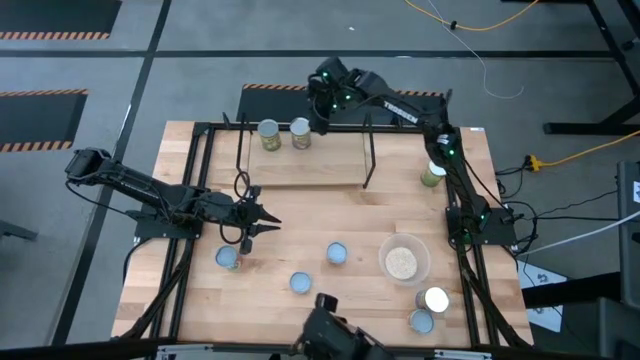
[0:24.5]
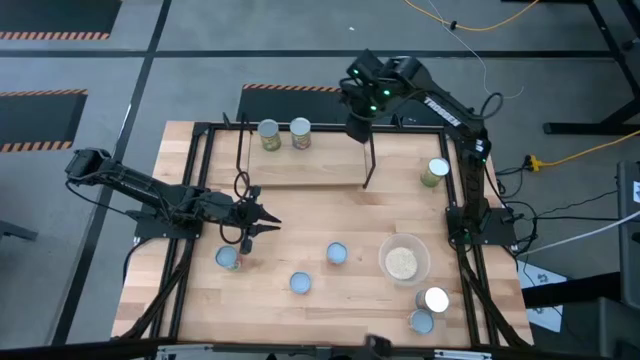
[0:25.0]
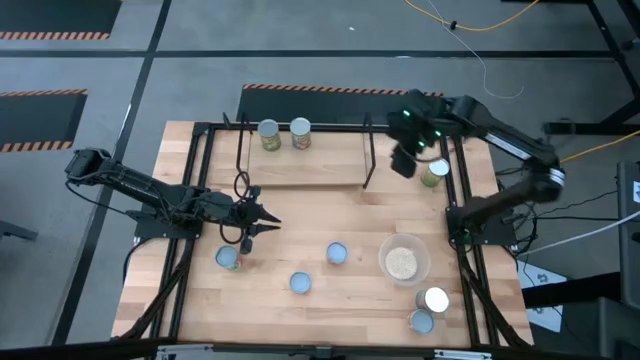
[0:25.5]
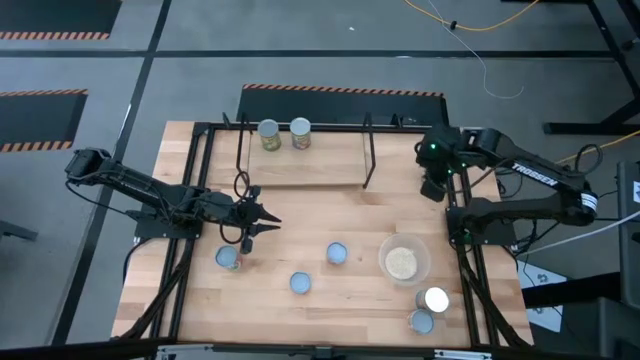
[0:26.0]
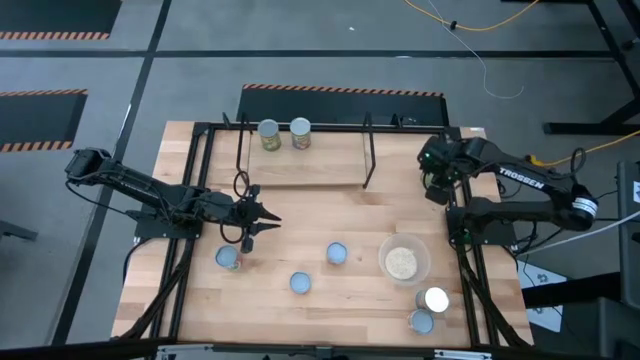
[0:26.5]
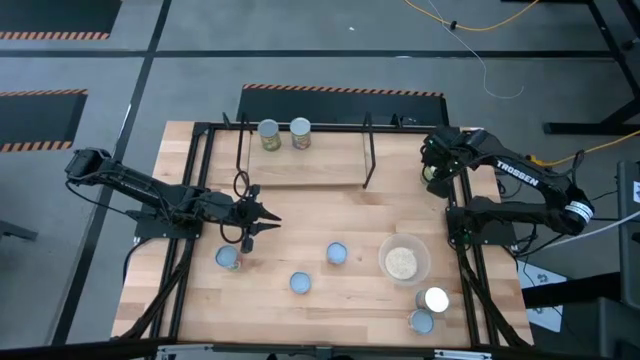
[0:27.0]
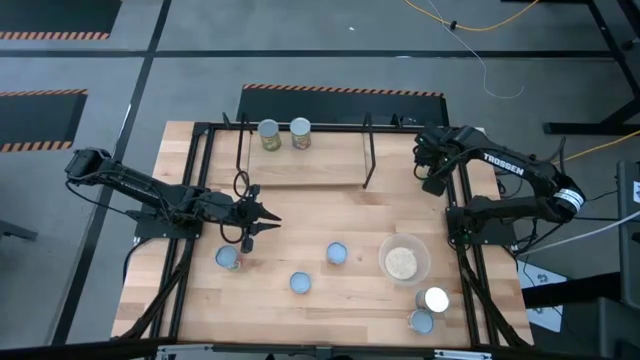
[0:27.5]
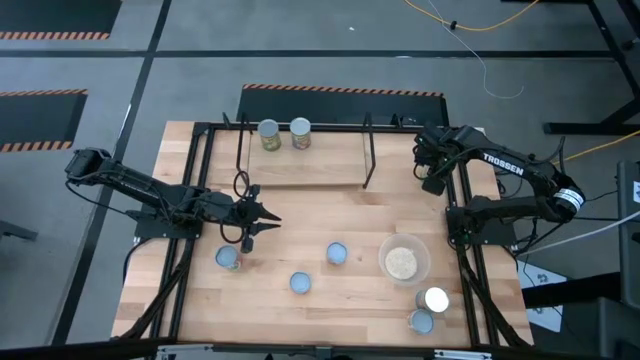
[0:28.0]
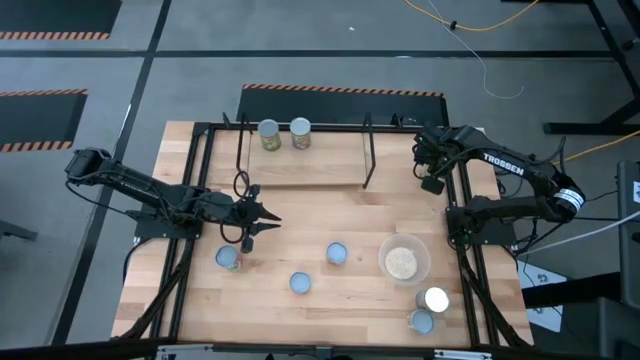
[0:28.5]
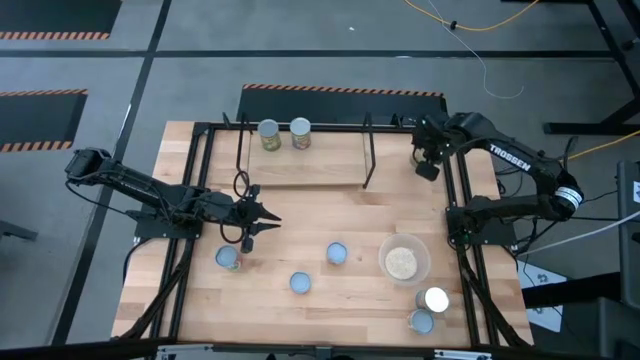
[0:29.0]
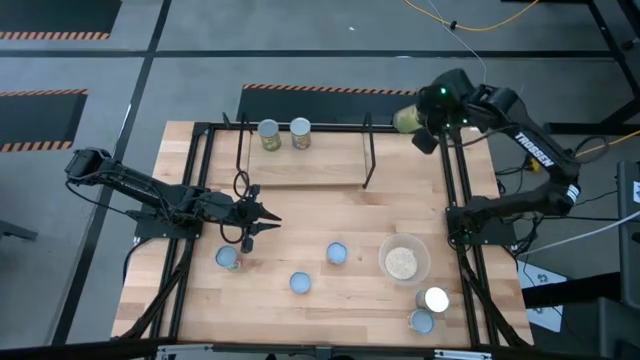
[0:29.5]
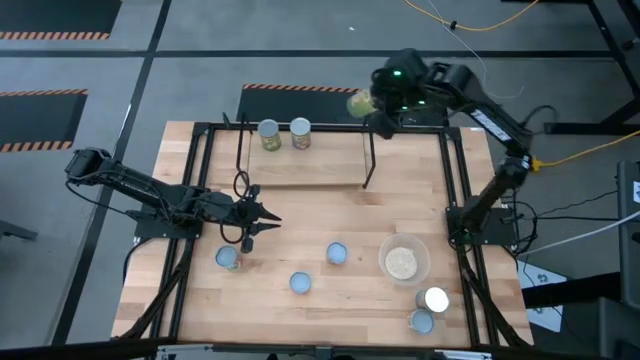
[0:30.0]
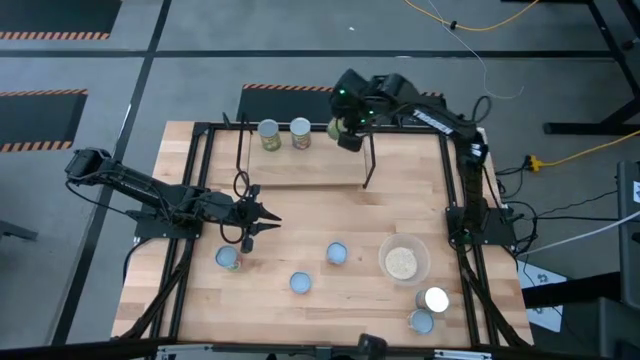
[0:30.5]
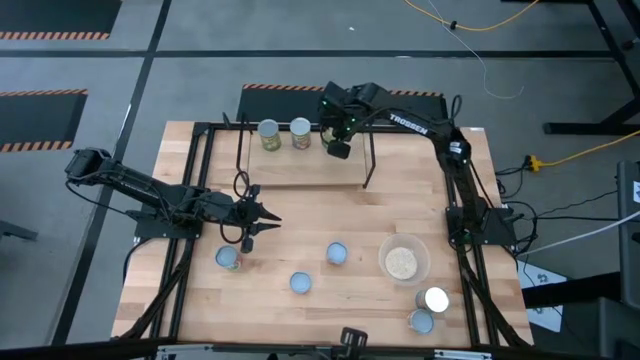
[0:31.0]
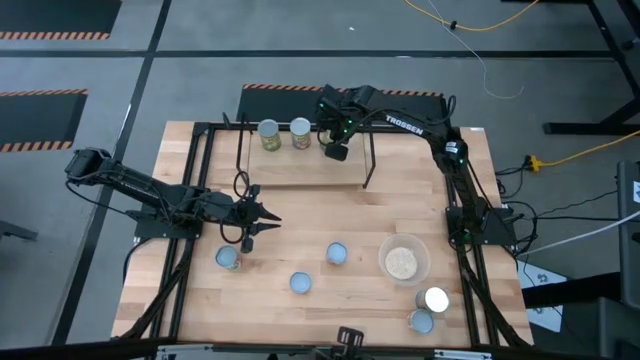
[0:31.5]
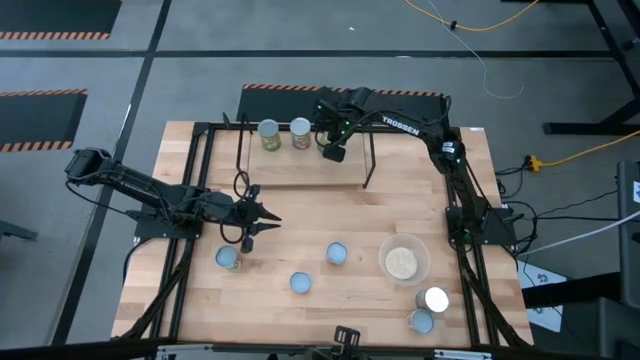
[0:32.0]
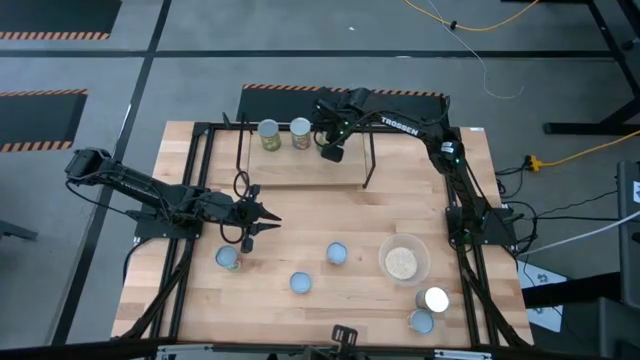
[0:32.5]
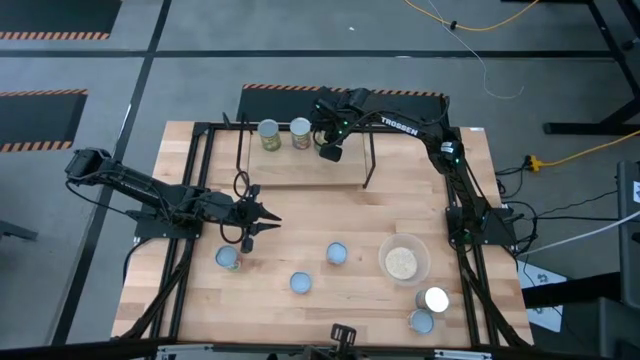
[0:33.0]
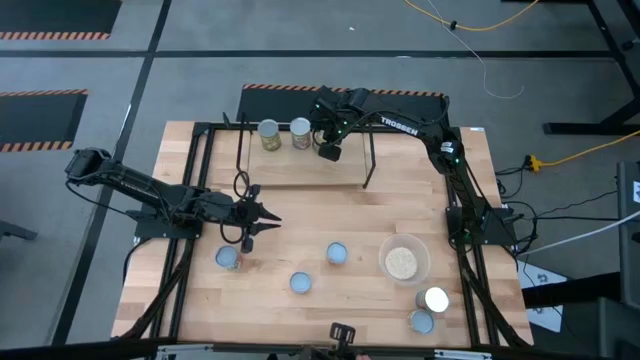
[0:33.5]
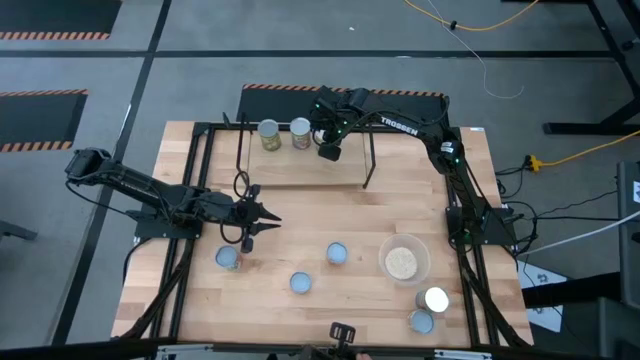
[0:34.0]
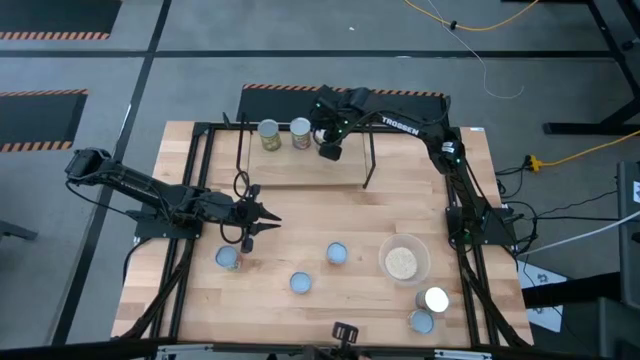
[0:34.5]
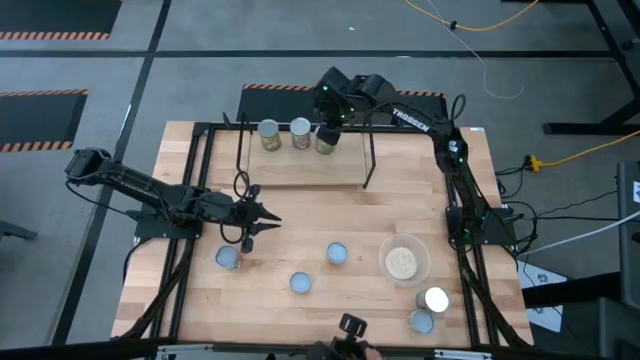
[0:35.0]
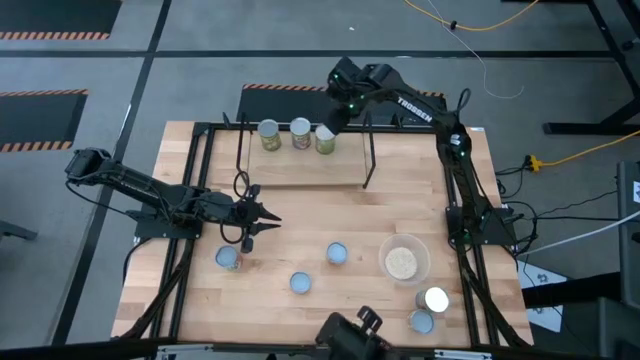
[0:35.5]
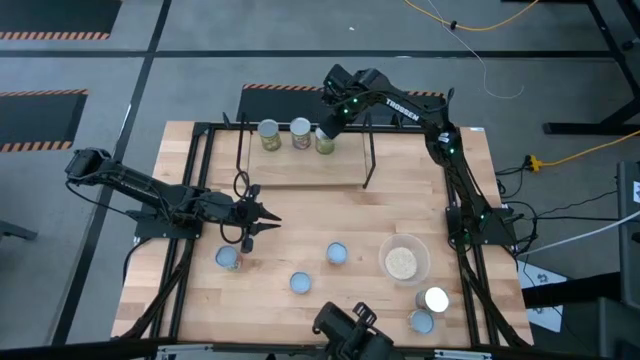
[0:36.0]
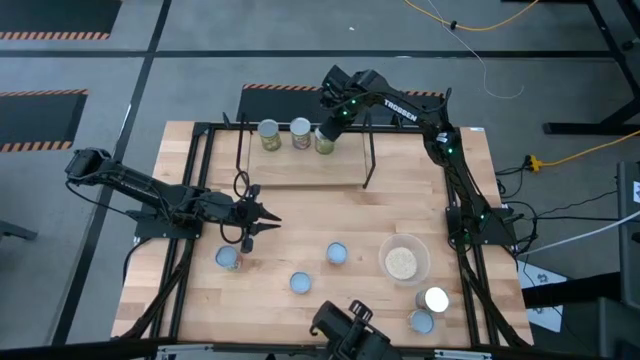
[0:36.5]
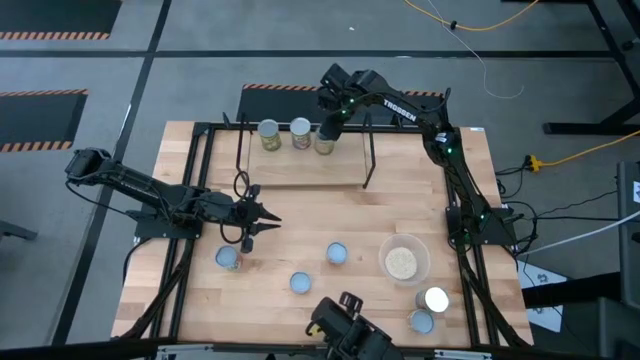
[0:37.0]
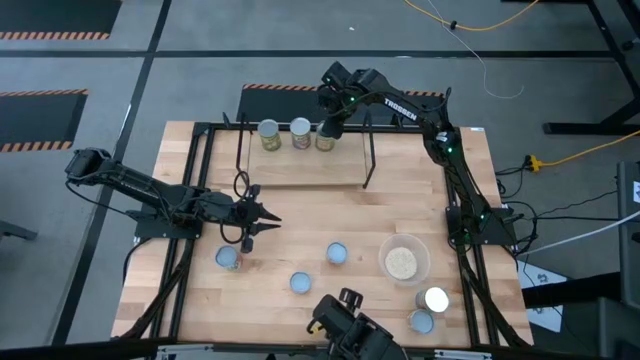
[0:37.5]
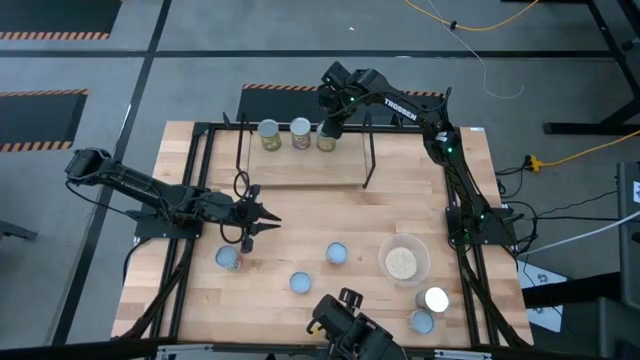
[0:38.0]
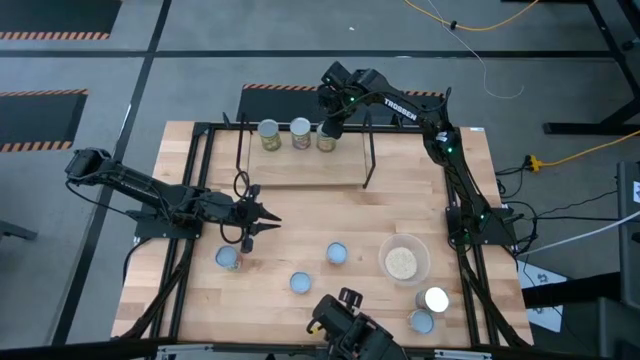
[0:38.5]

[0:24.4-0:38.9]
Task: Pick and place cans onto a shelf
Put the canned oranges on the shelf

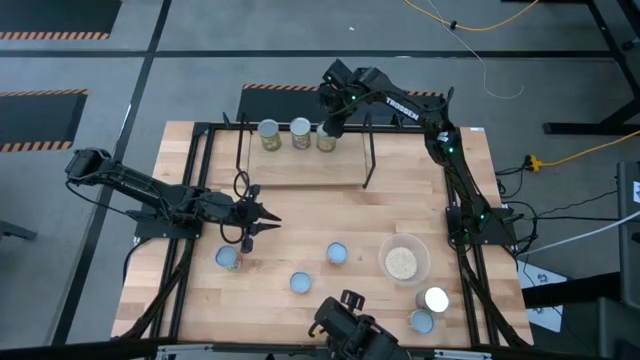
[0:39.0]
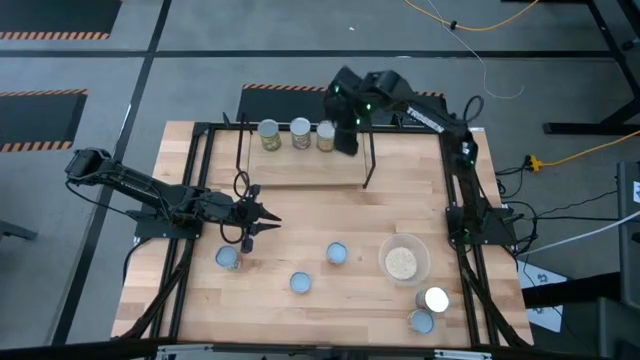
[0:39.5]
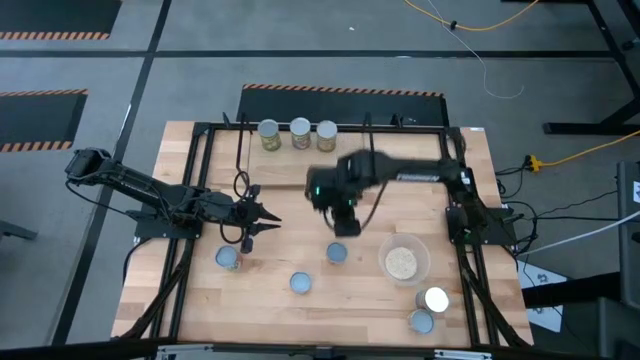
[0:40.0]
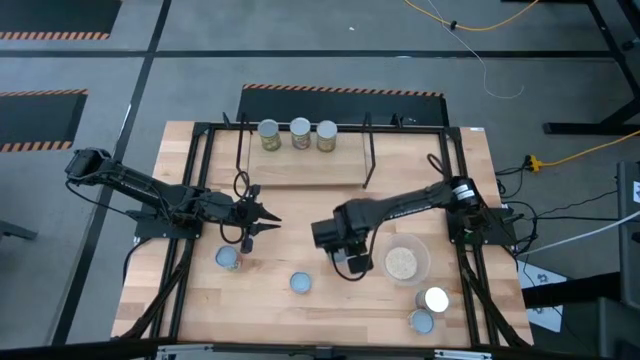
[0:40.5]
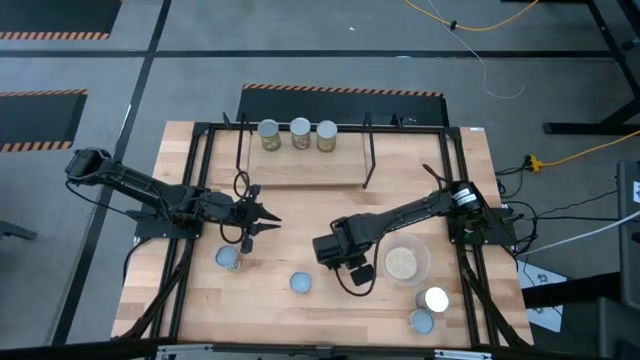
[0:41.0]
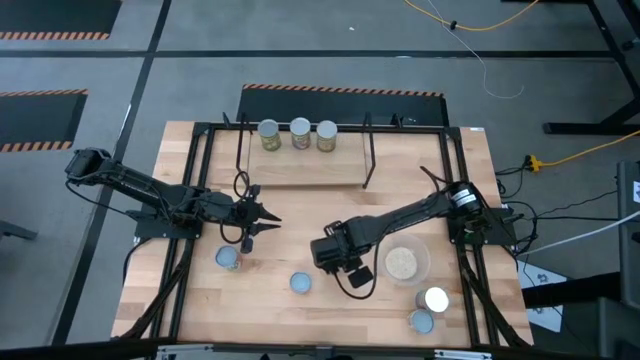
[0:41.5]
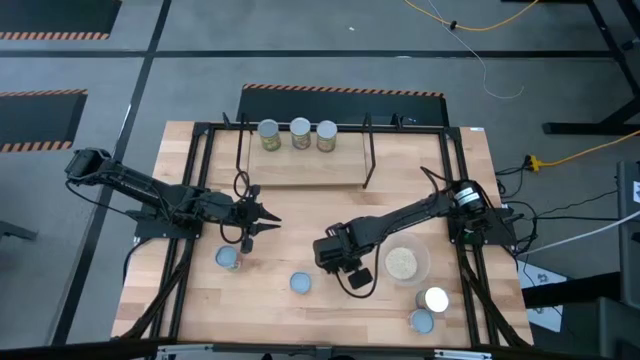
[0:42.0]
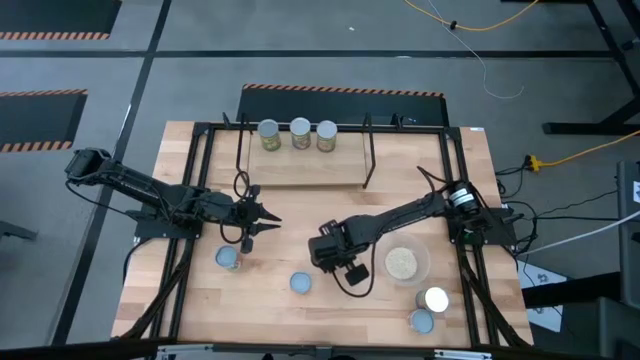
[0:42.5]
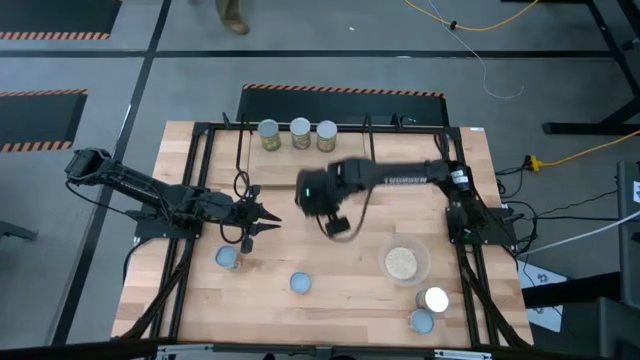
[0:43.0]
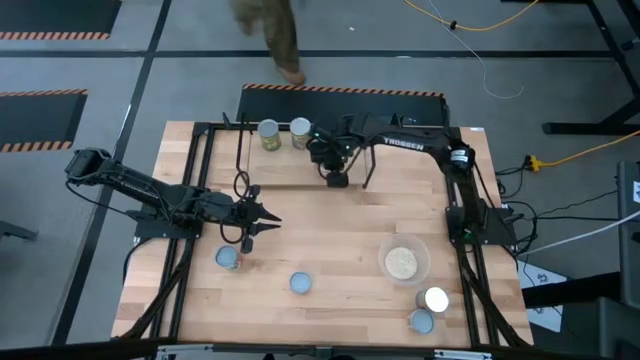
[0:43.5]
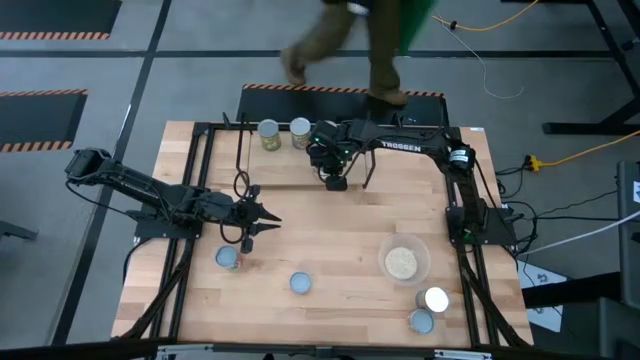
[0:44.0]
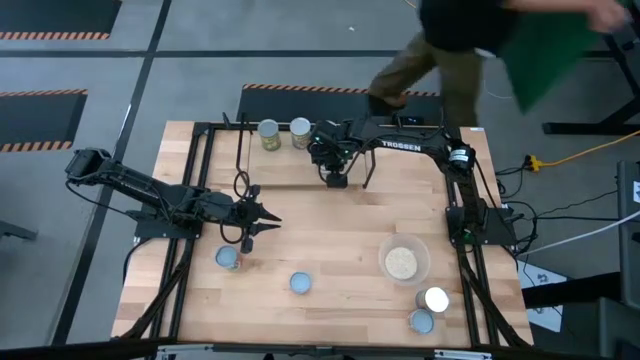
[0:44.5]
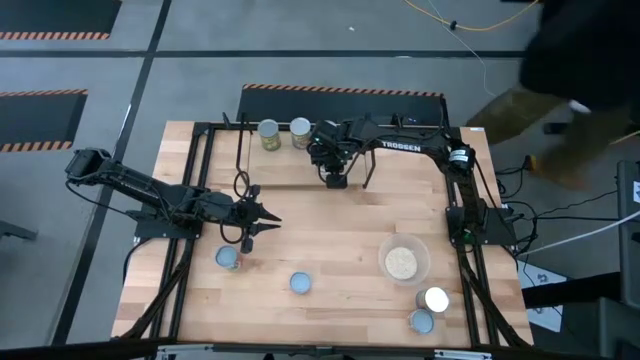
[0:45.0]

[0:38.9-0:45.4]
Put the small canned oranges on the shelf
